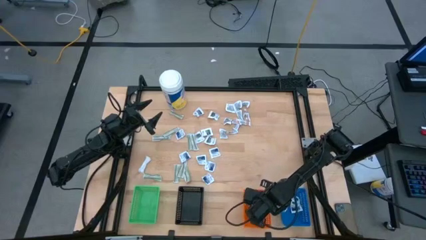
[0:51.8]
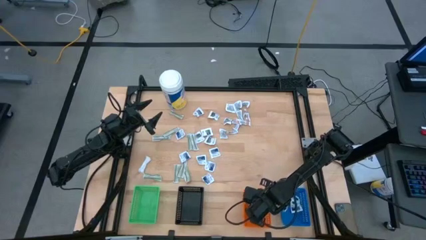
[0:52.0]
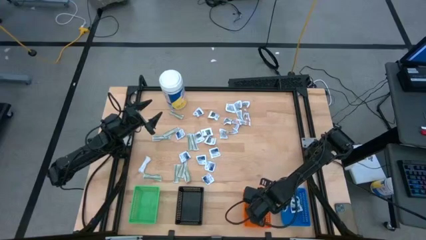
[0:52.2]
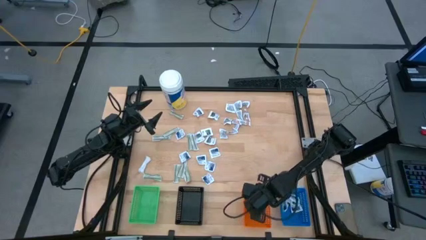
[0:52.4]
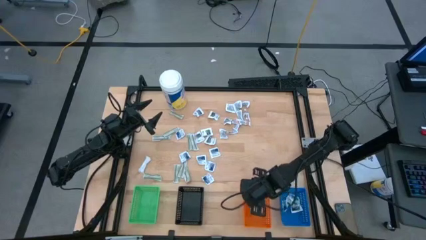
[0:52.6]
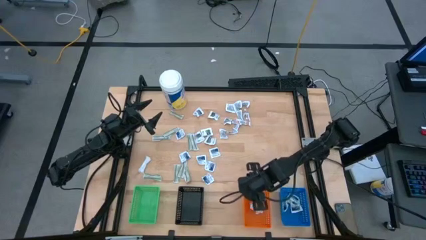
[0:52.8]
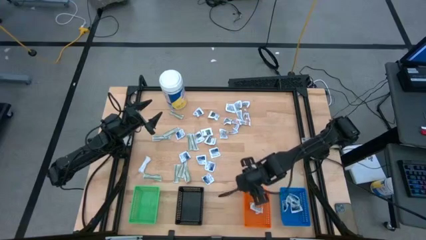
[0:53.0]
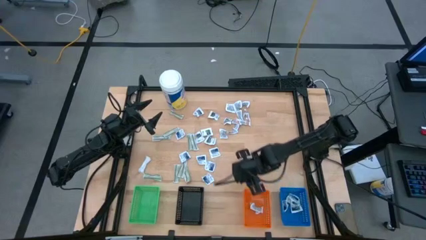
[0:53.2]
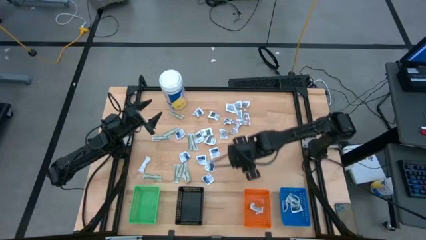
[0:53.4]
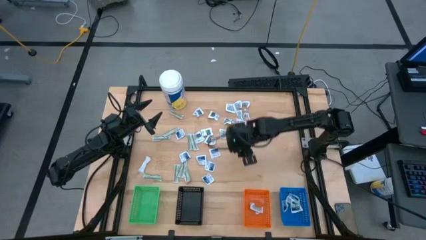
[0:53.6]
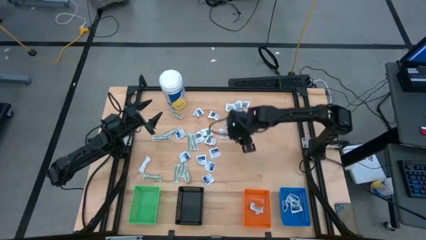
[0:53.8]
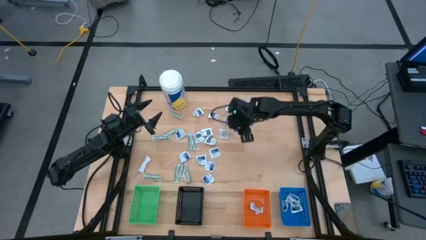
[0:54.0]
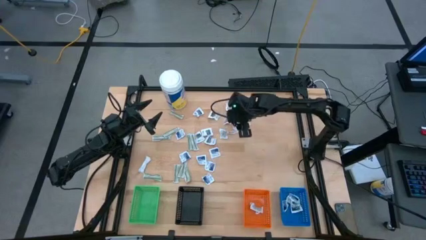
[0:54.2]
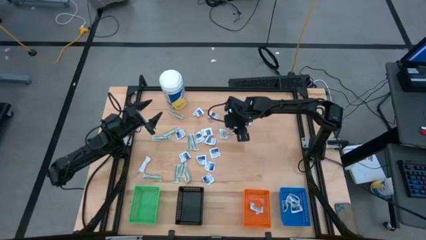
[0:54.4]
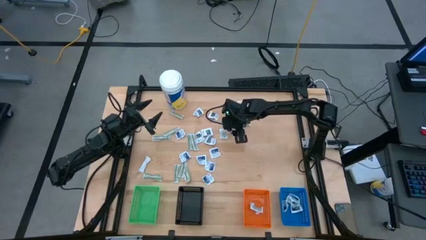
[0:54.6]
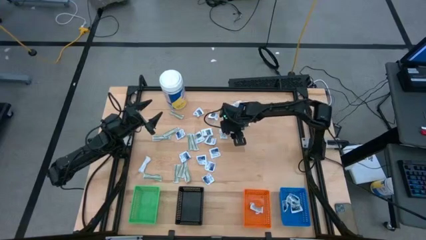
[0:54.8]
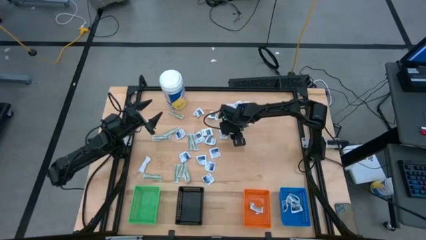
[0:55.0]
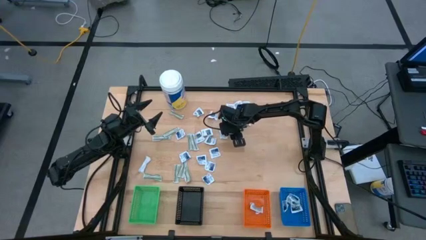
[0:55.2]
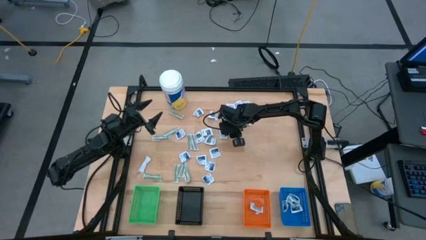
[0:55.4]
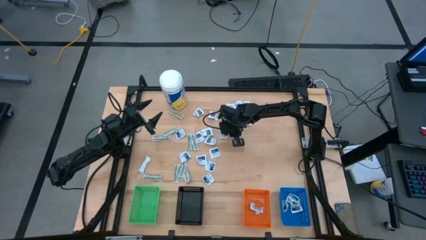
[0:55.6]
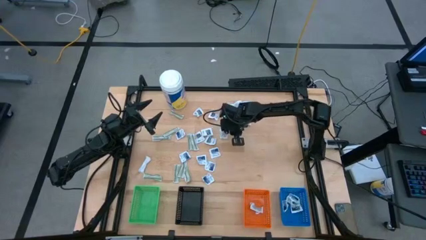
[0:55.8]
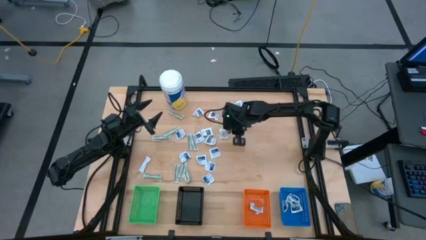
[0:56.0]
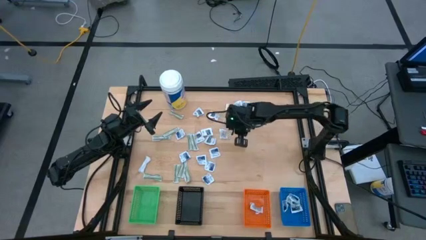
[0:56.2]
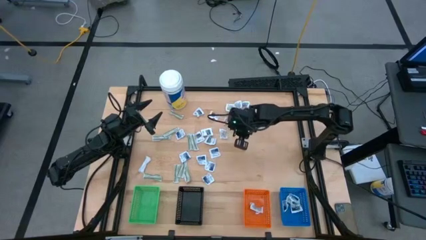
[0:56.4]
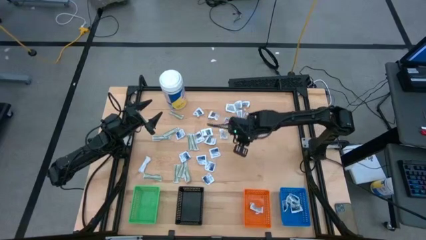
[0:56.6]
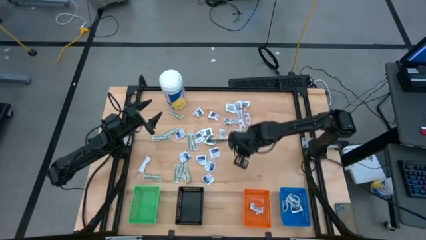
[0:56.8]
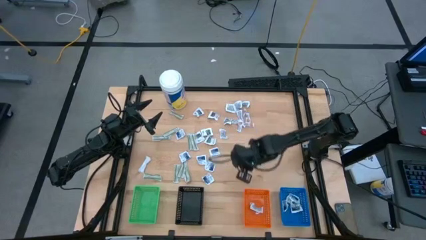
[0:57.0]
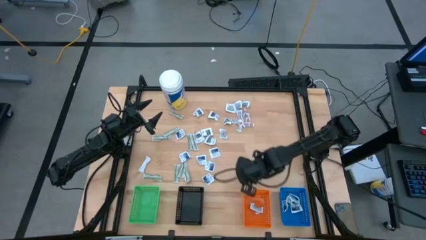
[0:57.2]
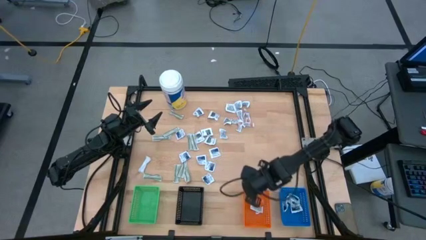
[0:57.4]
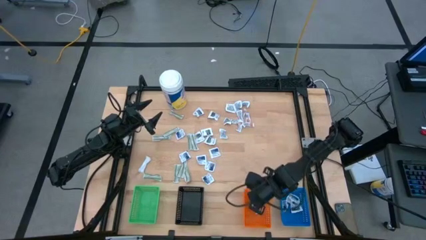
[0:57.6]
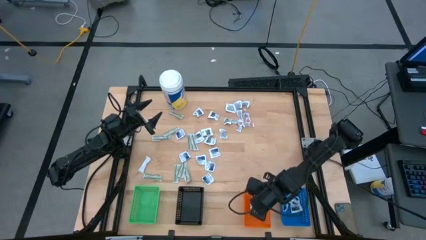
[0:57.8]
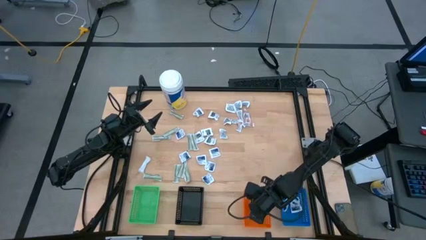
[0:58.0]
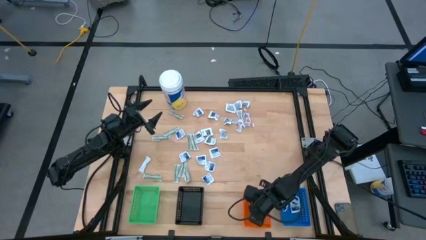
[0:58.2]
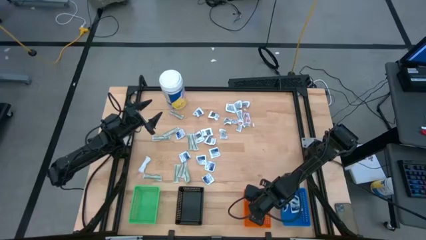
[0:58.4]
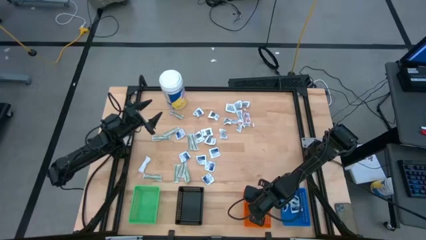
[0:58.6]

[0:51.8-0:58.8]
Task: Pick & Place First Aid Supplies
Put the ointment pack into the orange bin

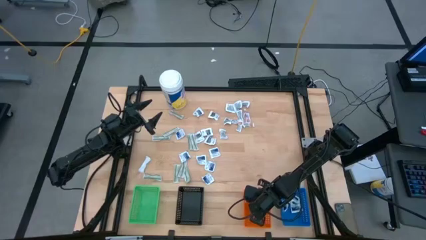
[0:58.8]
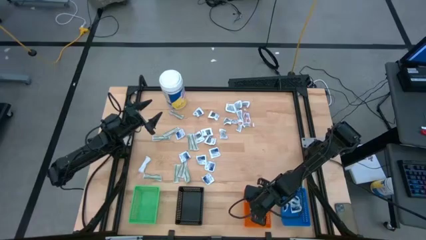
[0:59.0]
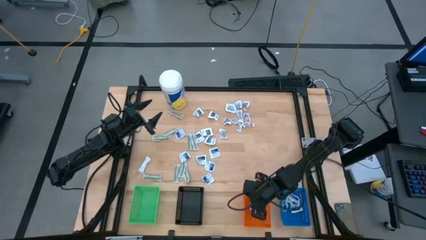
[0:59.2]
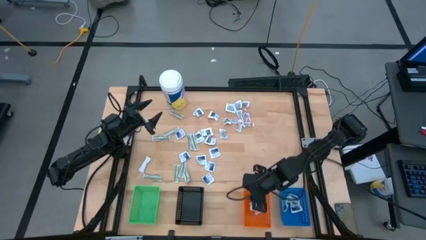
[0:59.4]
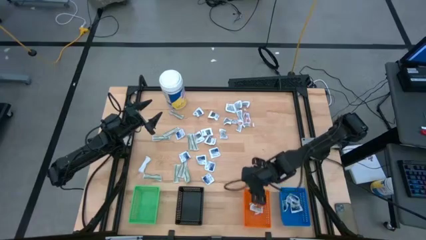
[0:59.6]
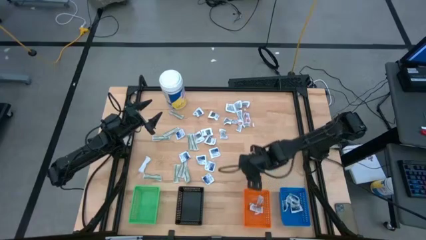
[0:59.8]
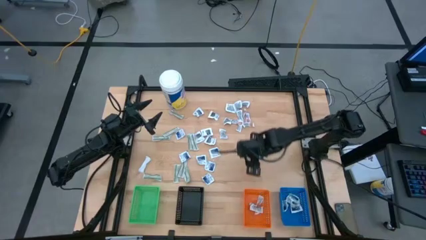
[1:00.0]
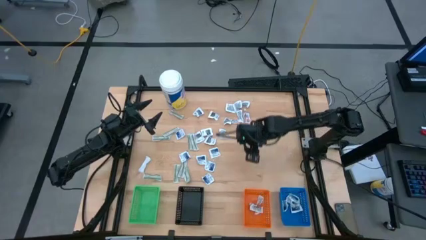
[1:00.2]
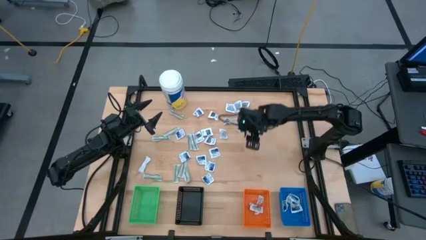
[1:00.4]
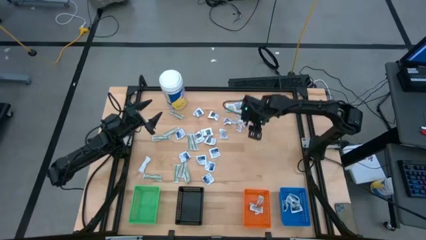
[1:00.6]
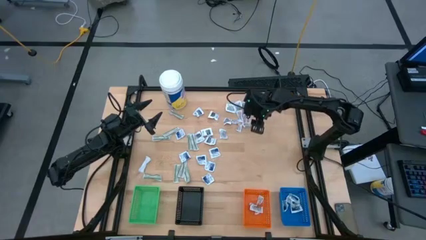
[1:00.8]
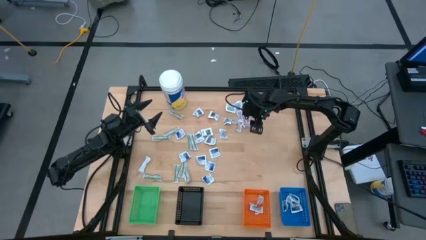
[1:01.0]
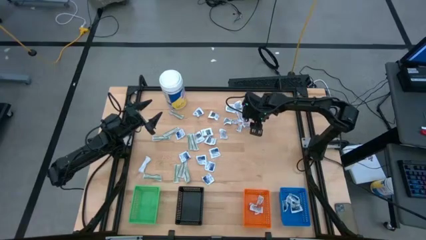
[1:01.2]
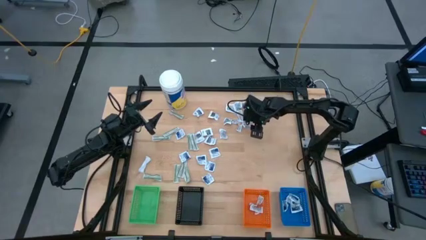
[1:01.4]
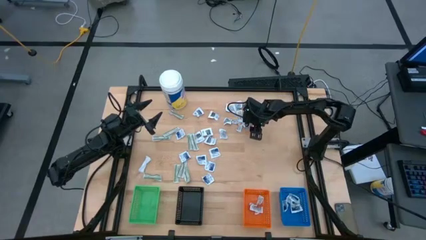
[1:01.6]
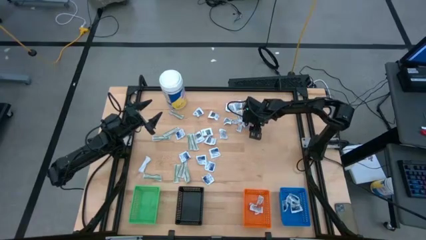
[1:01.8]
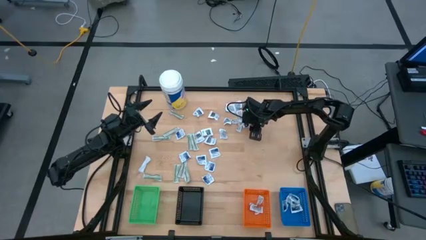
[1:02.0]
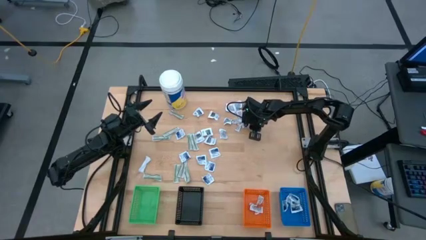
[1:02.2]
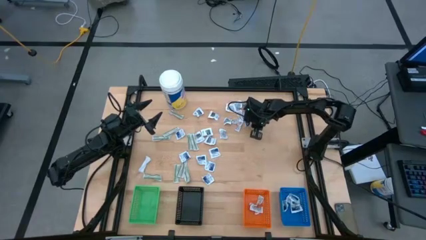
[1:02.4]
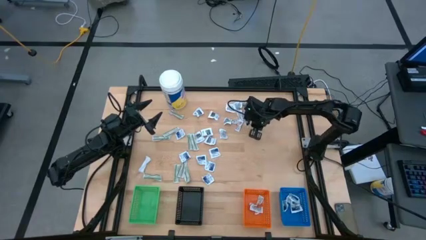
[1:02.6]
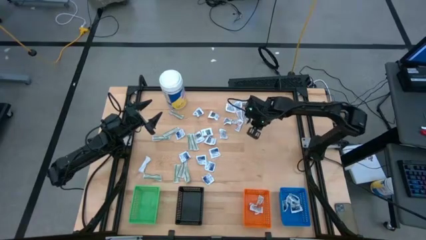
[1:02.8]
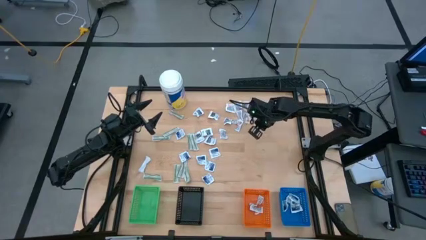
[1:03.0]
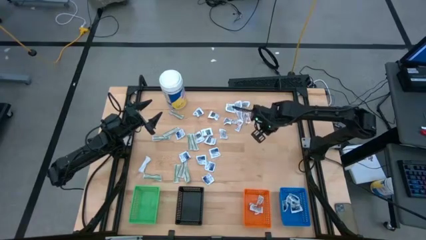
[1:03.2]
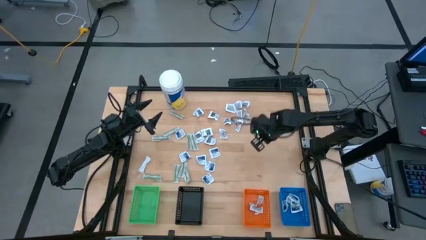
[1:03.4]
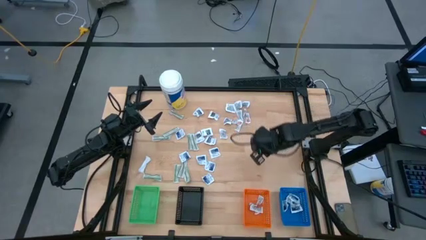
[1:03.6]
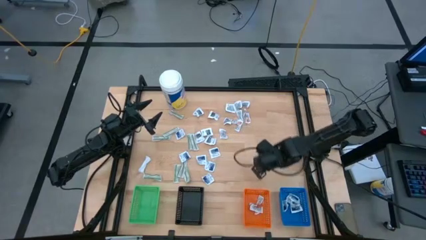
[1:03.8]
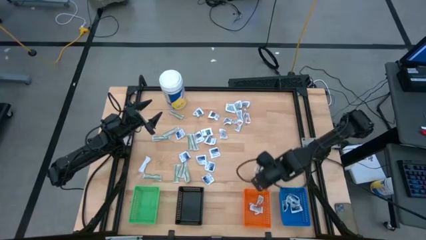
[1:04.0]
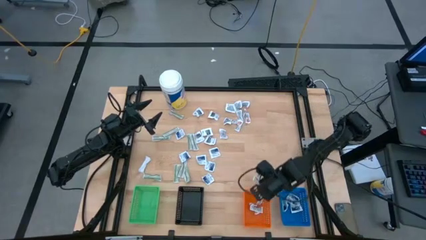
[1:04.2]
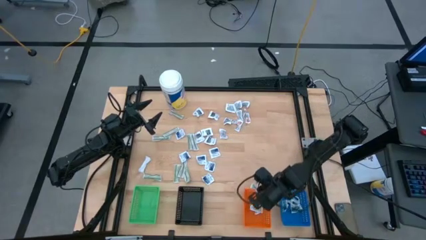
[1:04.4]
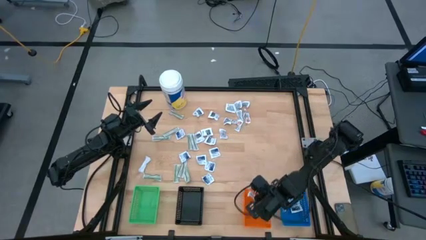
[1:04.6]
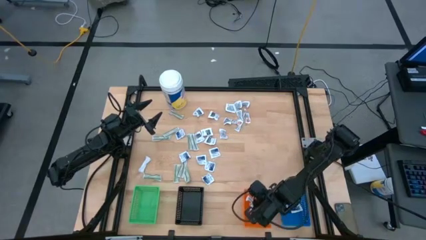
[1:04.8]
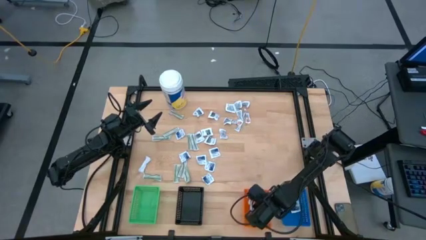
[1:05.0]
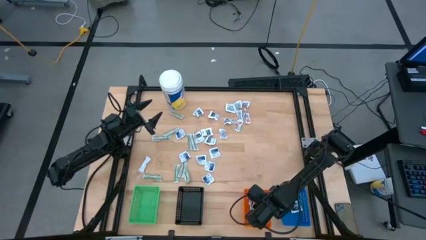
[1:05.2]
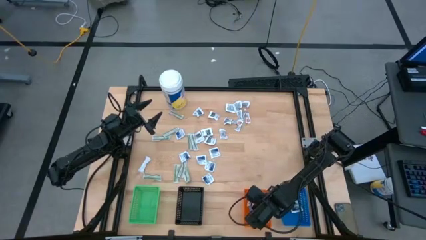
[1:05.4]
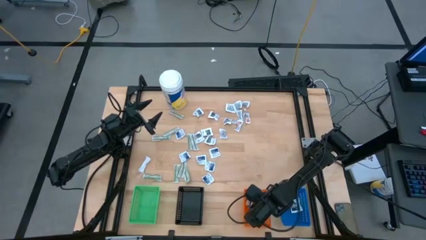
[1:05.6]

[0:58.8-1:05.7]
Put the ointment pack into the orange bin

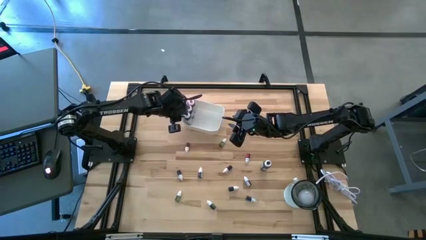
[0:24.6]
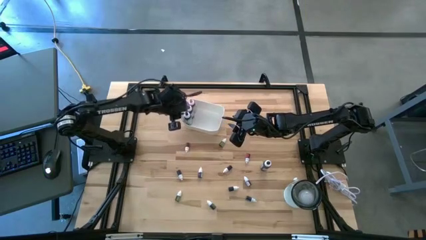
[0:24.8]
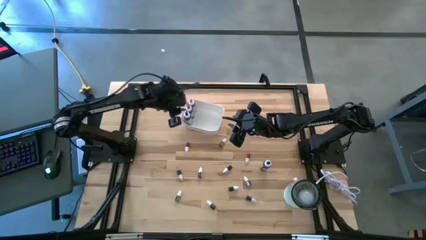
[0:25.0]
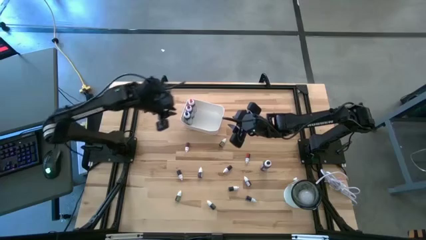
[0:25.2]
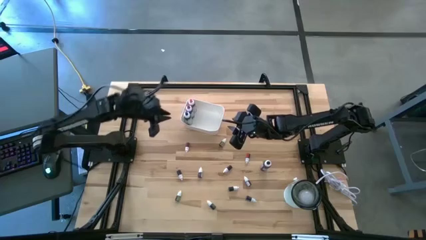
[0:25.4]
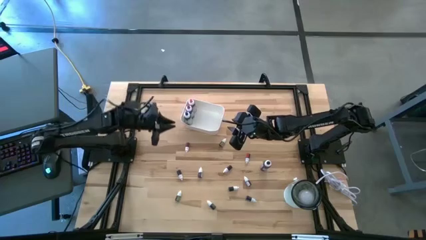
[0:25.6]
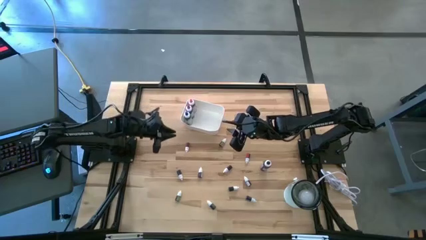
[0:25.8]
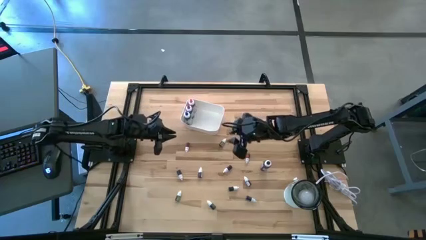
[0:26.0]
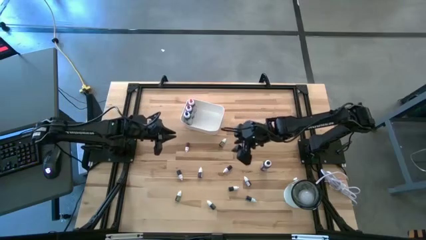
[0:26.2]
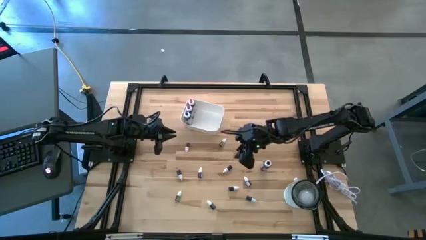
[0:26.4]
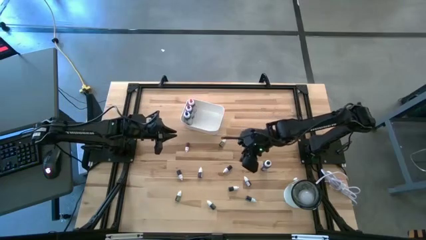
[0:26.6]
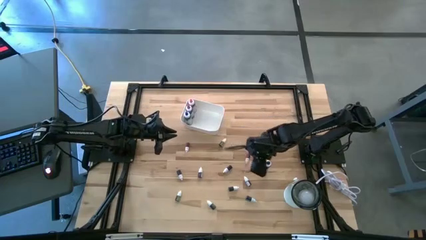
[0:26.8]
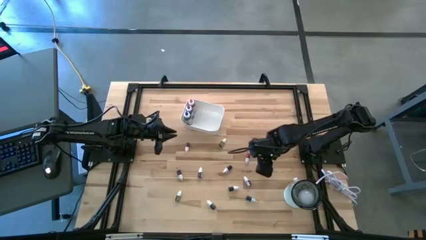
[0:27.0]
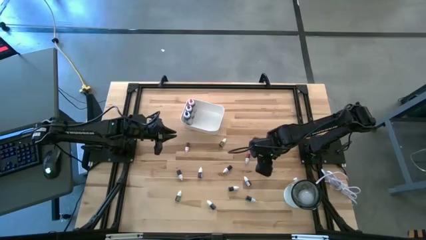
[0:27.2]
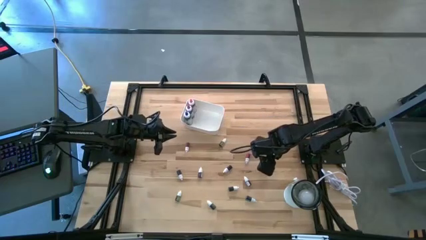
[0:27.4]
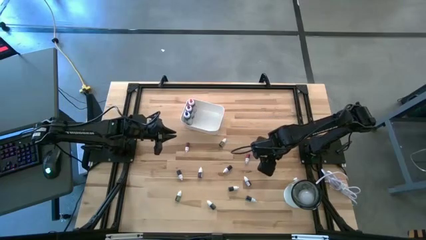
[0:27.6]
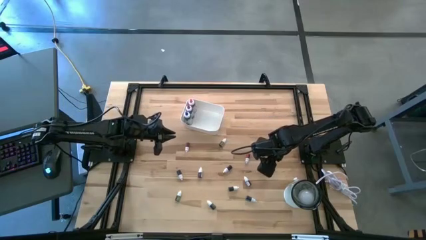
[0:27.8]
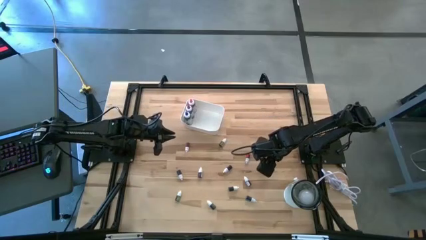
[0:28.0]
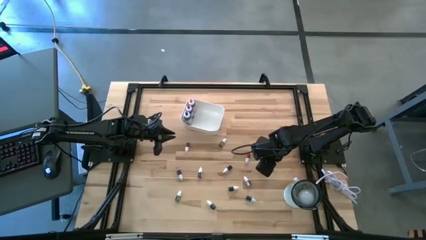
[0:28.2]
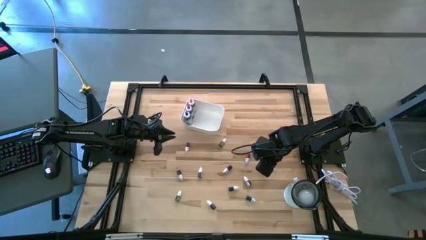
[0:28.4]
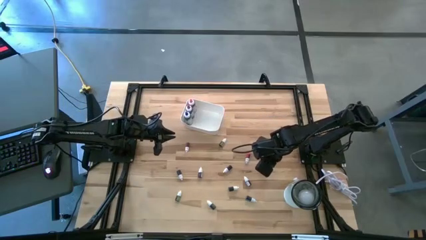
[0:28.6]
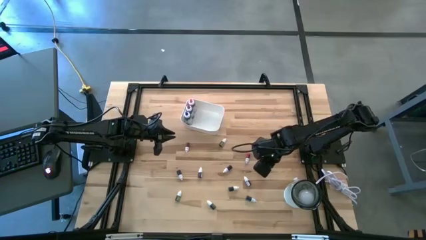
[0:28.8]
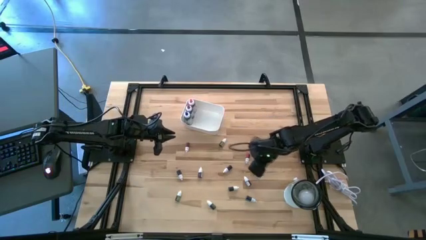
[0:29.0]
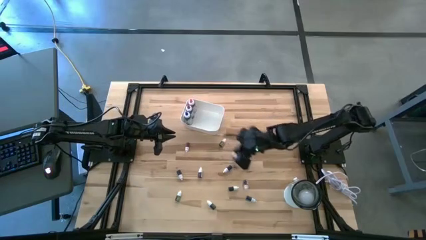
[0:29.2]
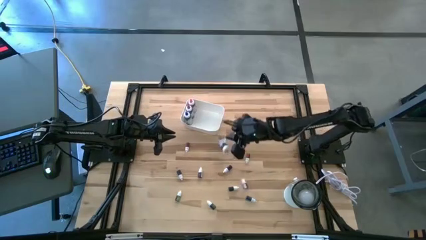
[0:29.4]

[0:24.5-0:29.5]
Task: Pick & Place food coloring
Put the large black food coloring bottle into the white bin
